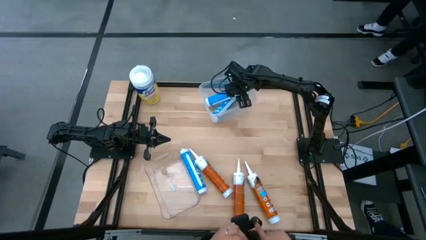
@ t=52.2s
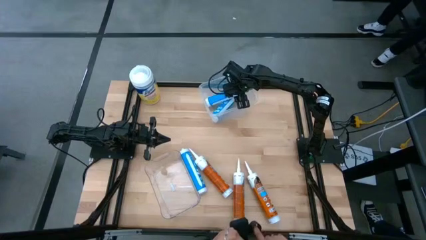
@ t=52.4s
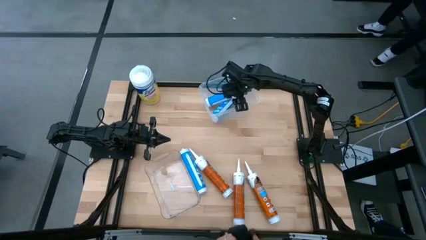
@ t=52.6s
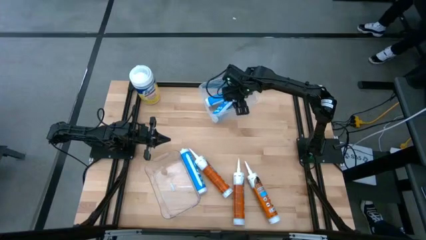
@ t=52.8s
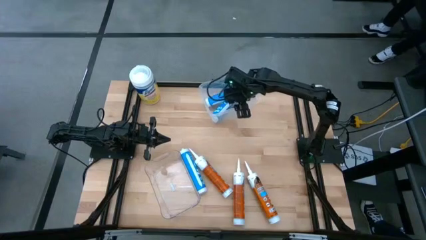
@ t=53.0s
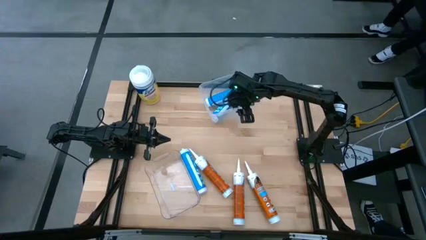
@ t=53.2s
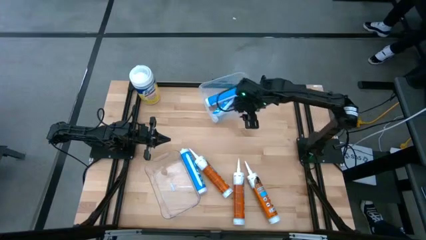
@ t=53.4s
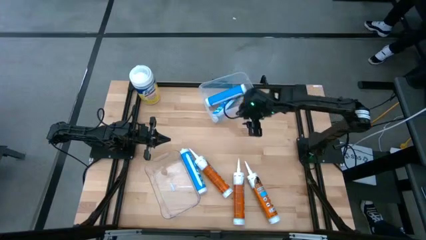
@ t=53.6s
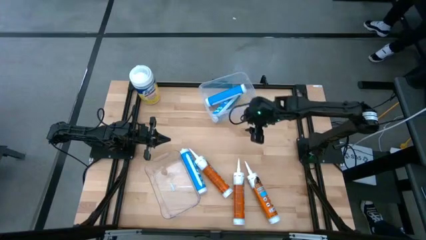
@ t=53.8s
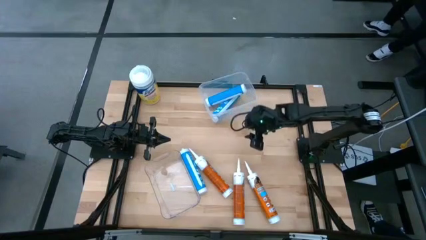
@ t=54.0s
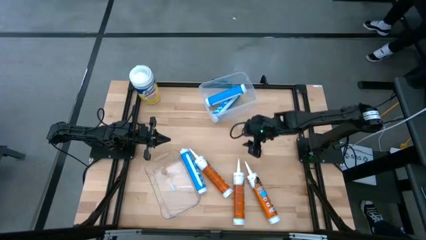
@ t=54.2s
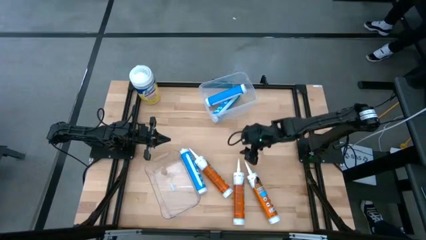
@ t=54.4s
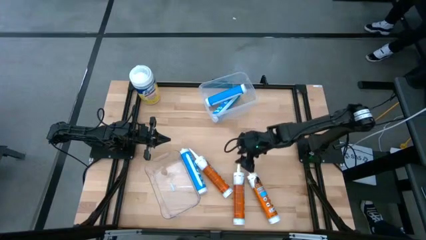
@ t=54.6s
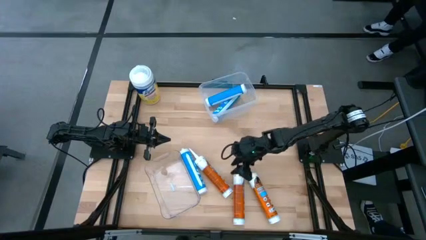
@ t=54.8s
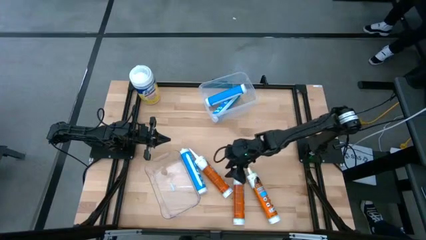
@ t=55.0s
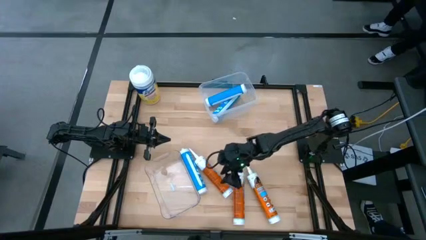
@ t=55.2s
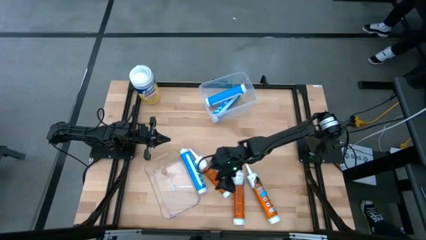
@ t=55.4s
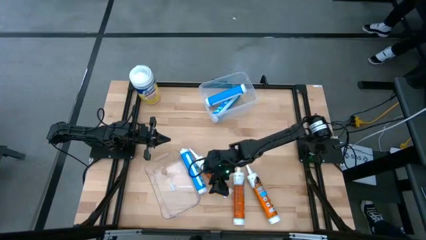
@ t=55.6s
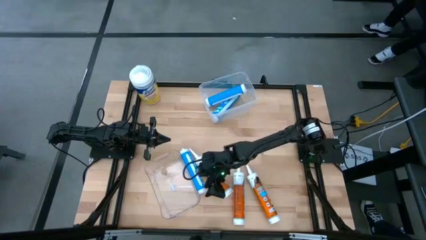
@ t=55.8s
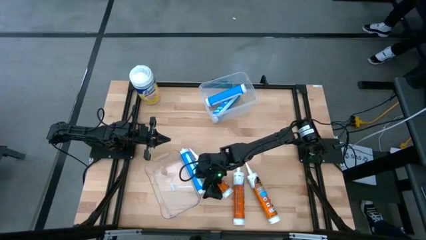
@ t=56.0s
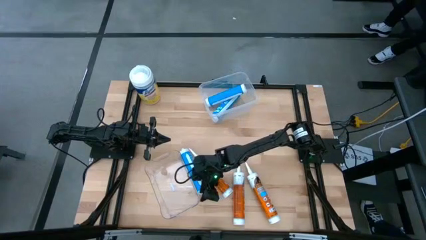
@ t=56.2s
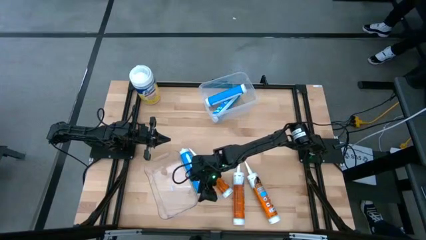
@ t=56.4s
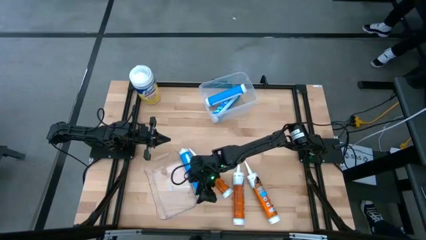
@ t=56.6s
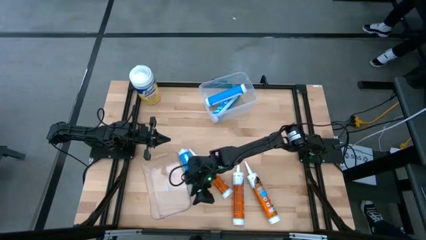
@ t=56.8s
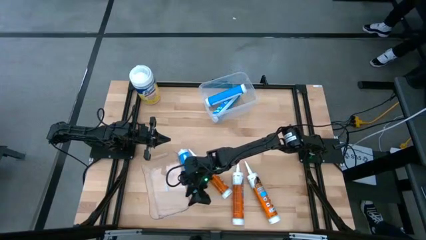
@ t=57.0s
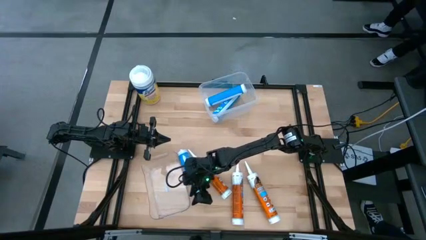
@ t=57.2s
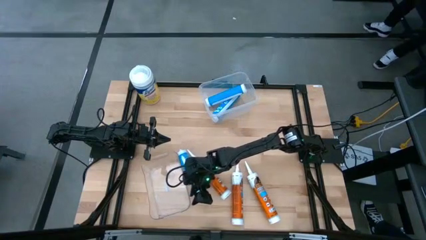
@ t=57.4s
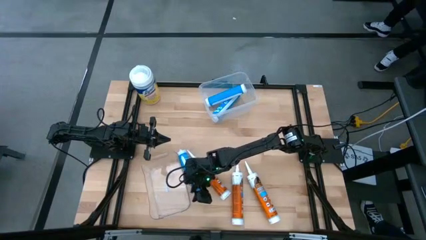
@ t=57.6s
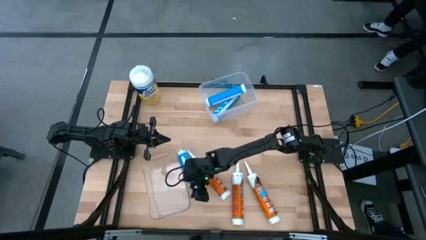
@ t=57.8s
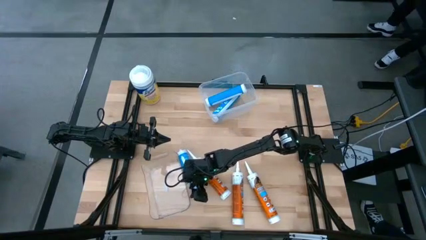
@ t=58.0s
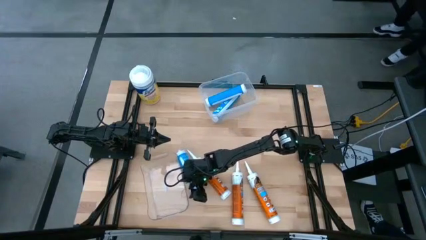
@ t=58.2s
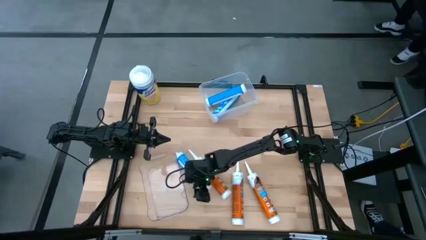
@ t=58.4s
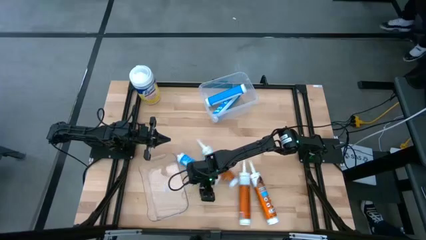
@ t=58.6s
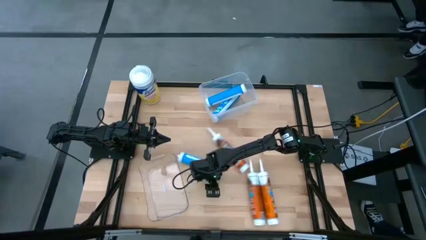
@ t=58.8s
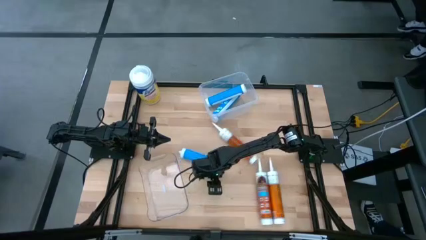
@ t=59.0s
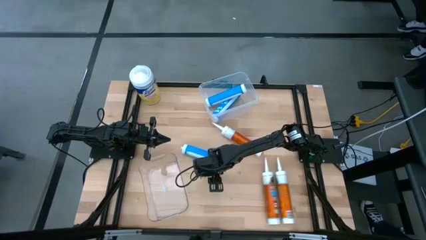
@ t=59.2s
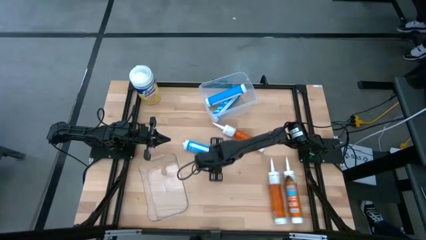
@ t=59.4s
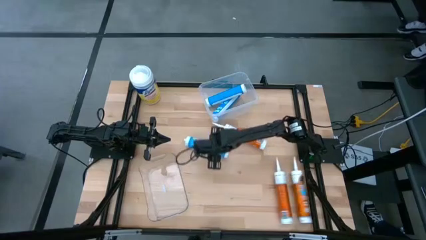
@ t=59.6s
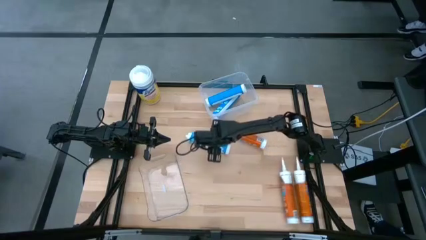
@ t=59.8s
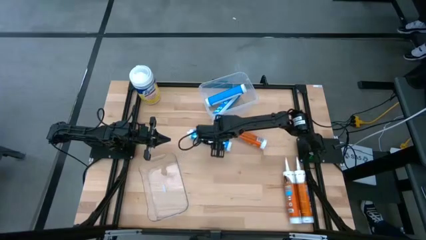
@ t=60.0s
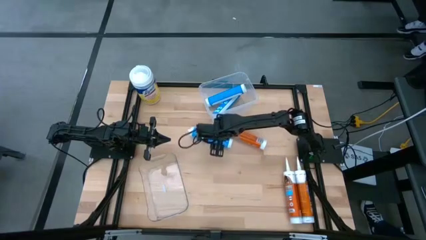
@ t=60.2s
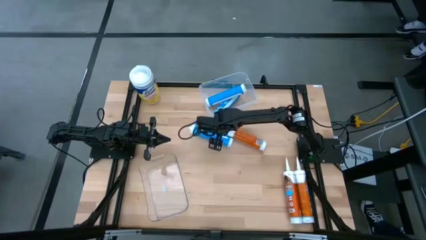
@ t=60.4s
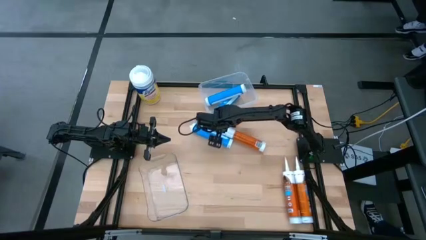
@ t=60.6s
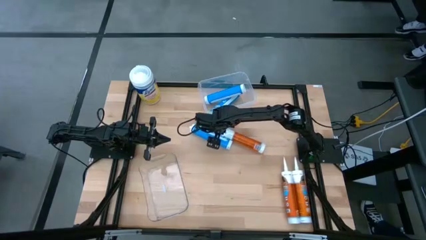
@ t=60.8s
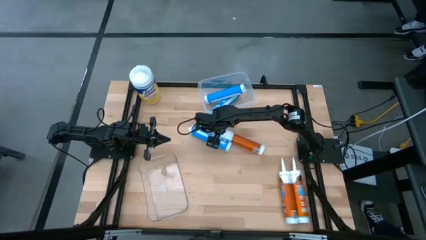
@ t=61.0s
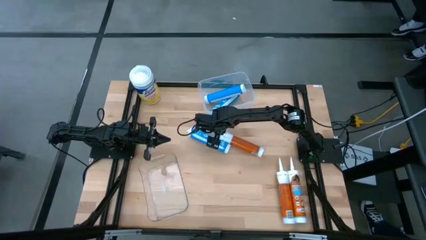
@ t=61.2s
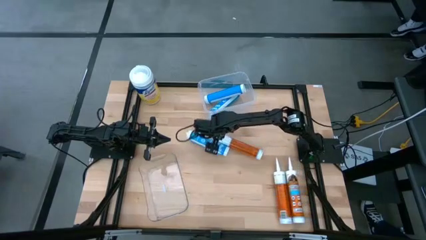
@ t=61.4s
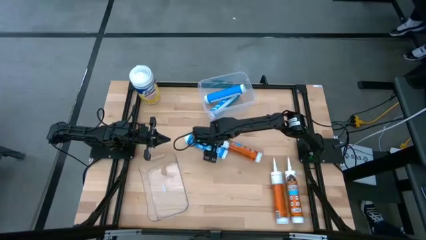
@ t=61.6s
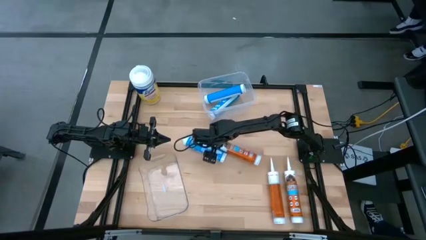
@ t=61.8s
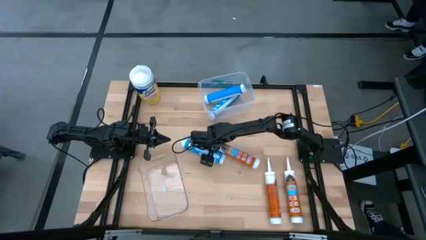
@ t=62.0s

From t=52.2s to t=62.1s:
Task: Pick & place silicon tubes, Sealant and Lysol wipes
Put the blue sealant into the white bin
